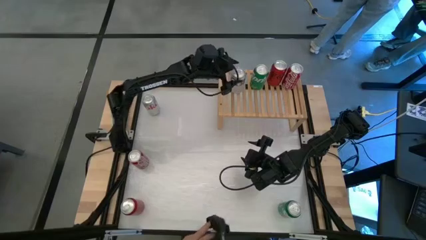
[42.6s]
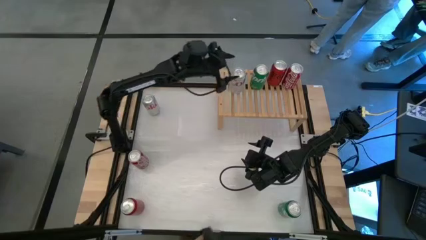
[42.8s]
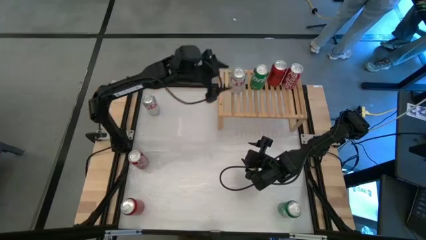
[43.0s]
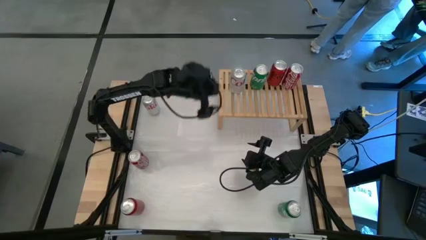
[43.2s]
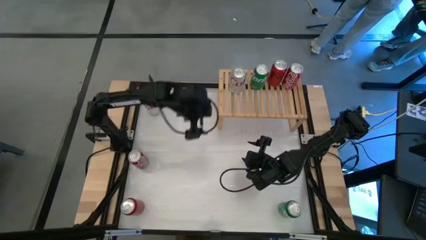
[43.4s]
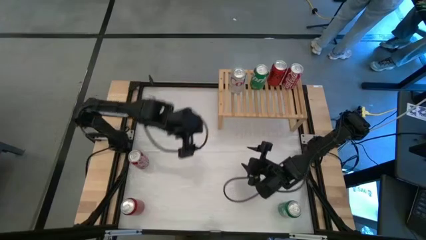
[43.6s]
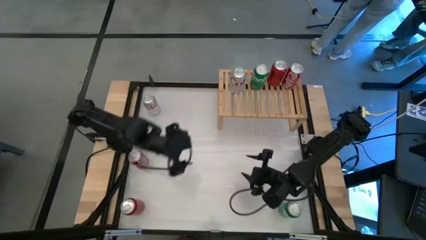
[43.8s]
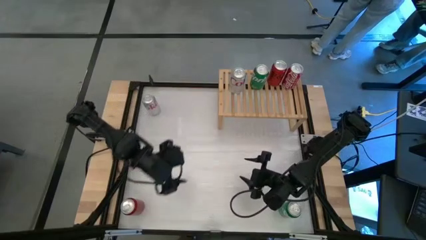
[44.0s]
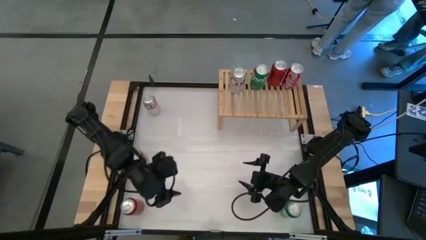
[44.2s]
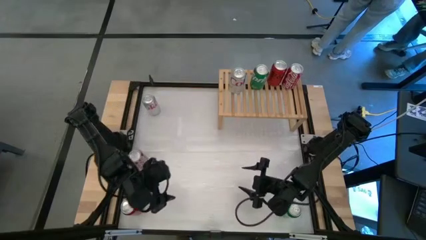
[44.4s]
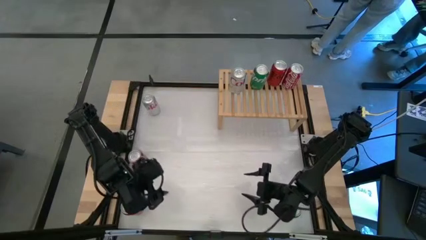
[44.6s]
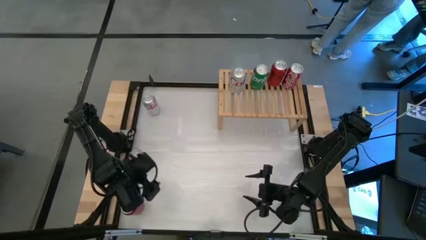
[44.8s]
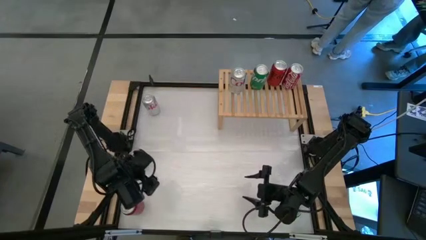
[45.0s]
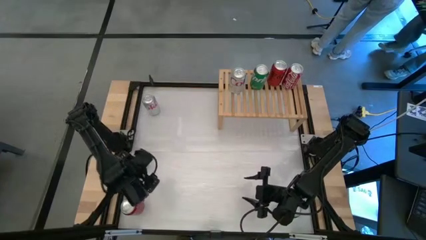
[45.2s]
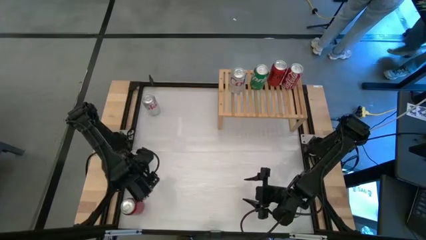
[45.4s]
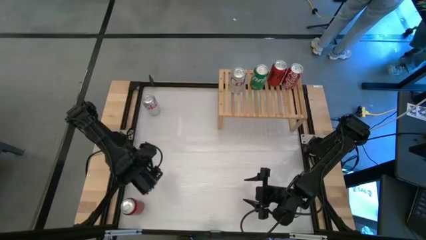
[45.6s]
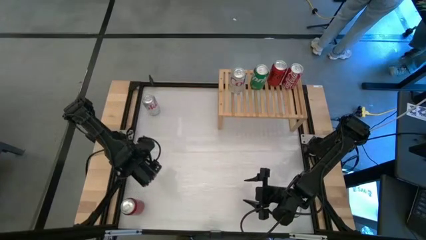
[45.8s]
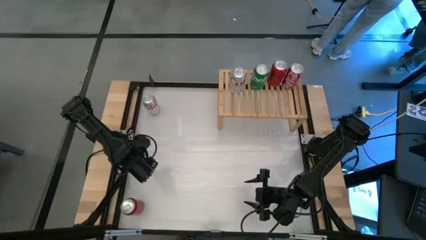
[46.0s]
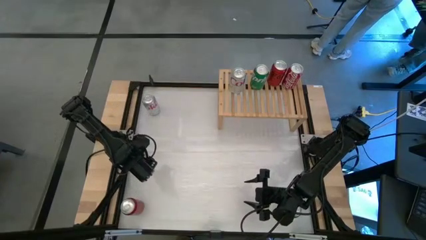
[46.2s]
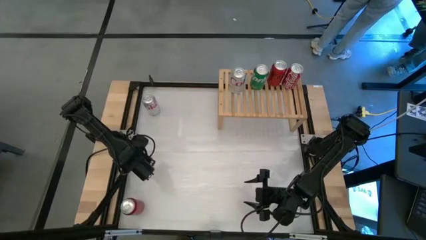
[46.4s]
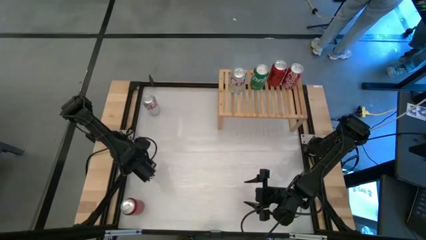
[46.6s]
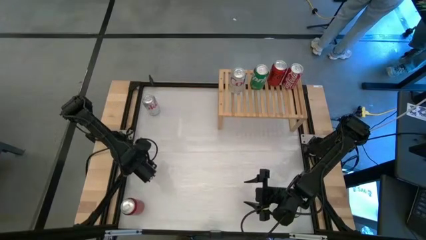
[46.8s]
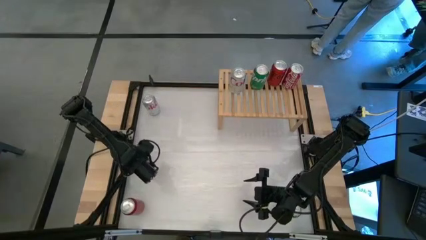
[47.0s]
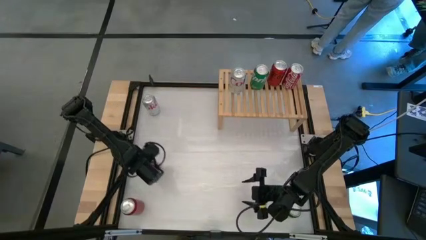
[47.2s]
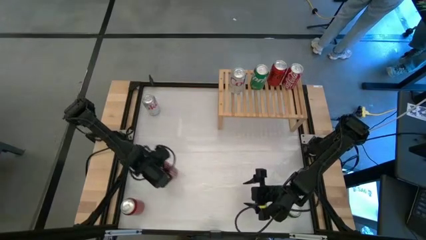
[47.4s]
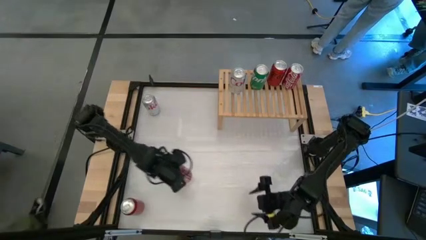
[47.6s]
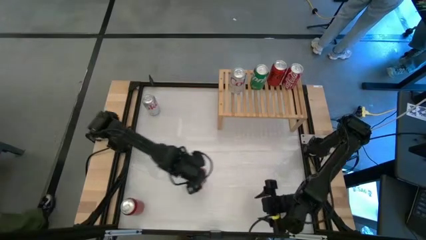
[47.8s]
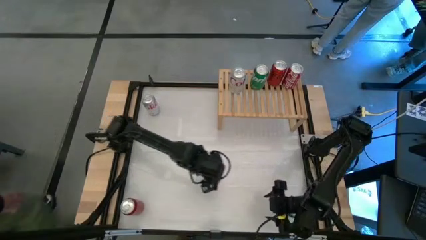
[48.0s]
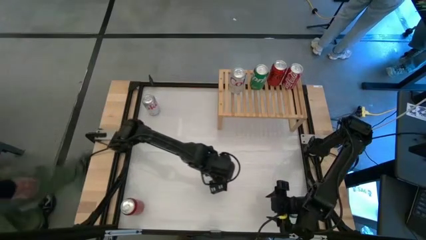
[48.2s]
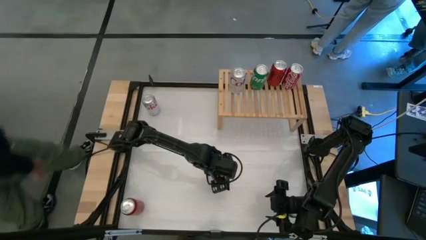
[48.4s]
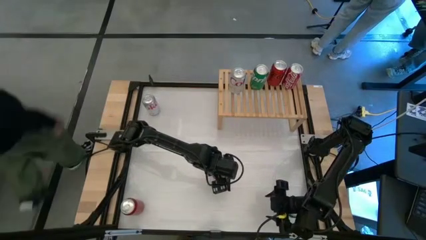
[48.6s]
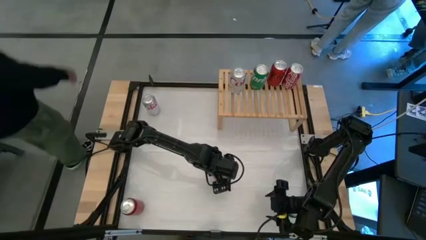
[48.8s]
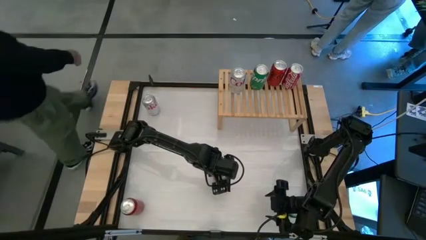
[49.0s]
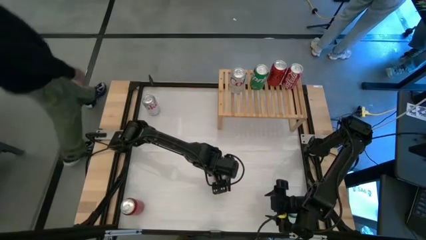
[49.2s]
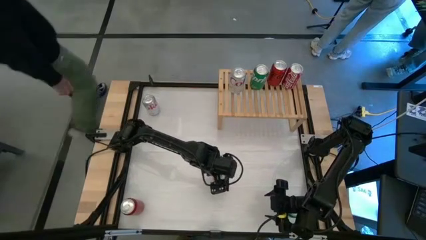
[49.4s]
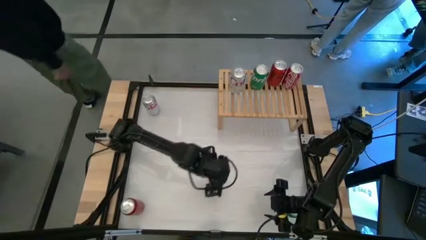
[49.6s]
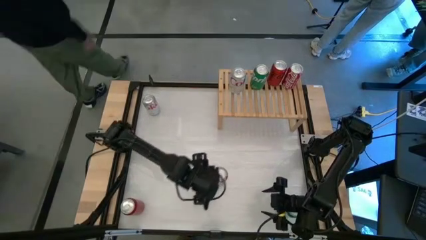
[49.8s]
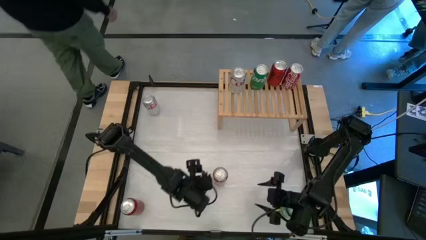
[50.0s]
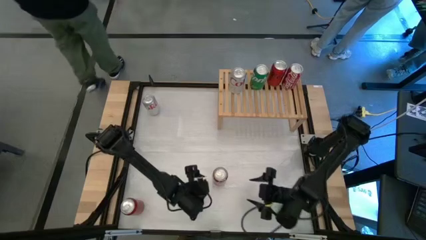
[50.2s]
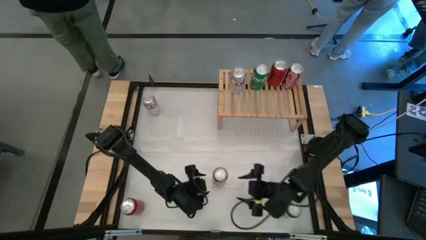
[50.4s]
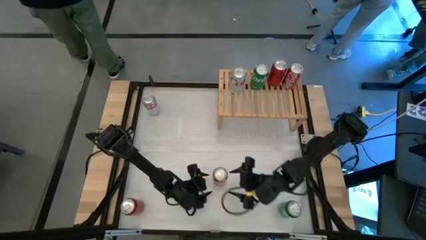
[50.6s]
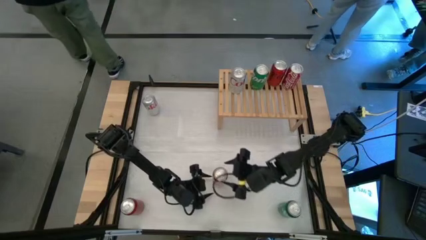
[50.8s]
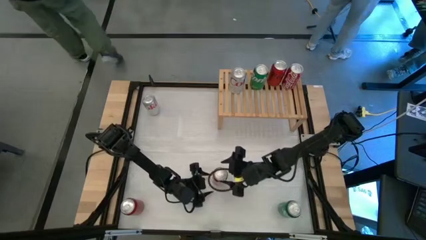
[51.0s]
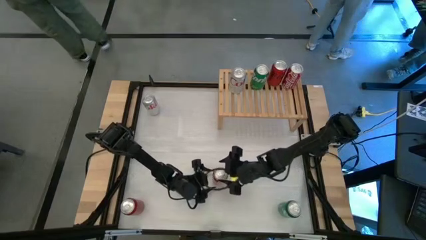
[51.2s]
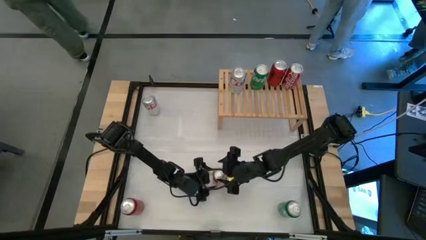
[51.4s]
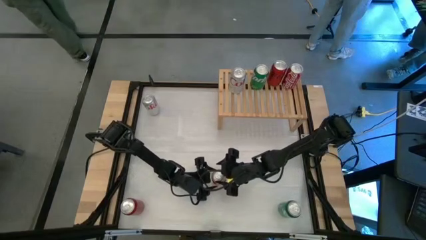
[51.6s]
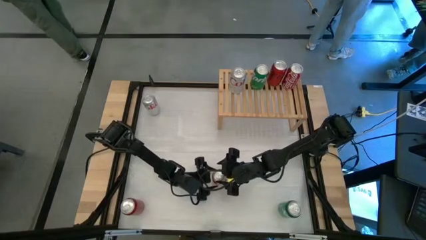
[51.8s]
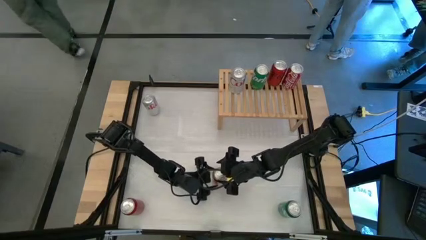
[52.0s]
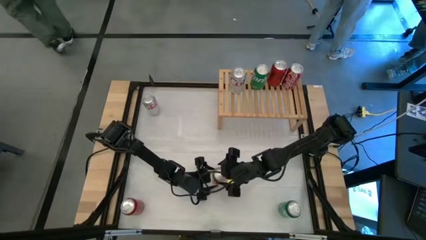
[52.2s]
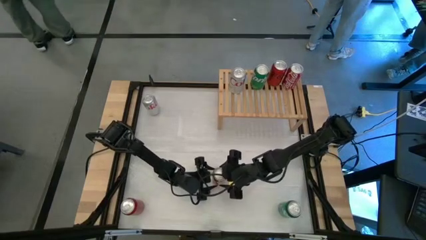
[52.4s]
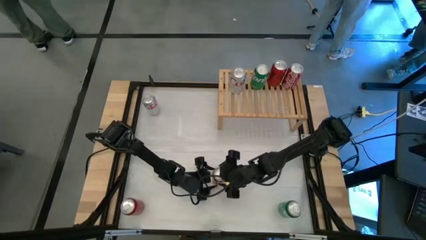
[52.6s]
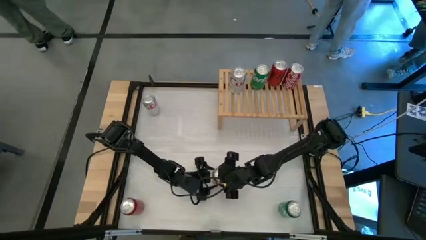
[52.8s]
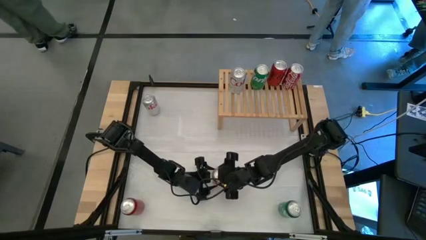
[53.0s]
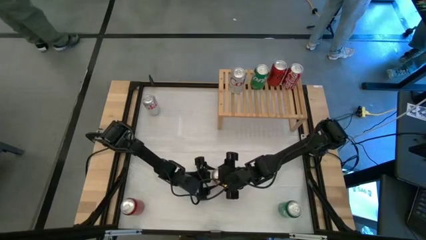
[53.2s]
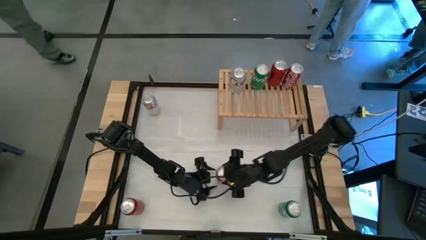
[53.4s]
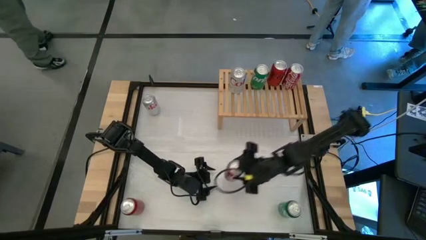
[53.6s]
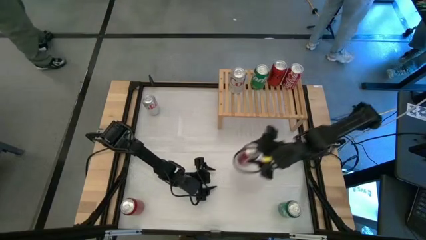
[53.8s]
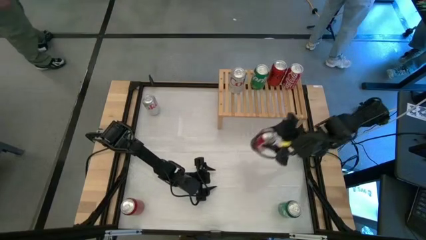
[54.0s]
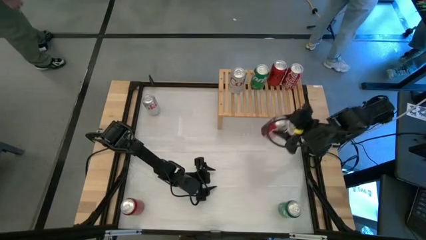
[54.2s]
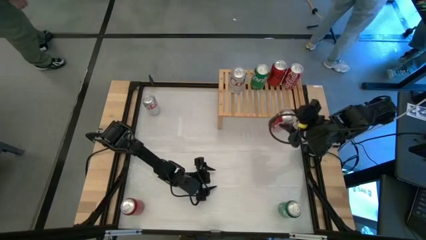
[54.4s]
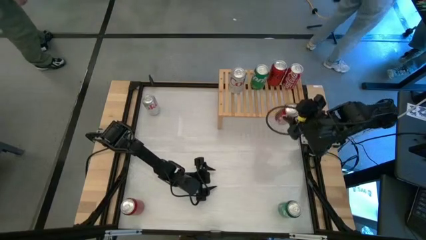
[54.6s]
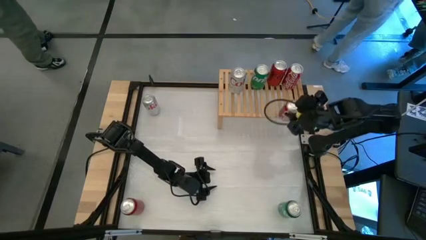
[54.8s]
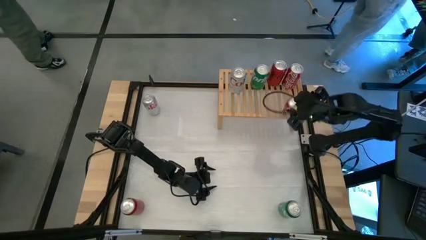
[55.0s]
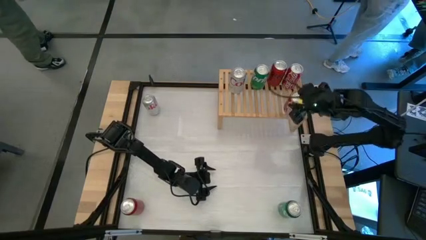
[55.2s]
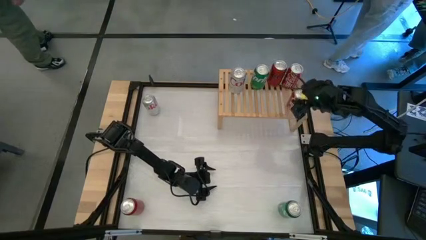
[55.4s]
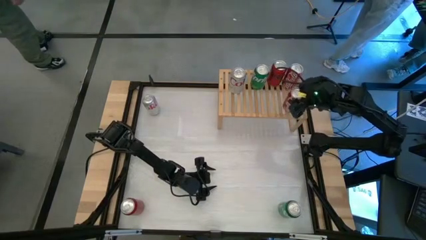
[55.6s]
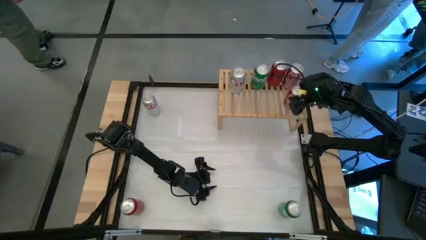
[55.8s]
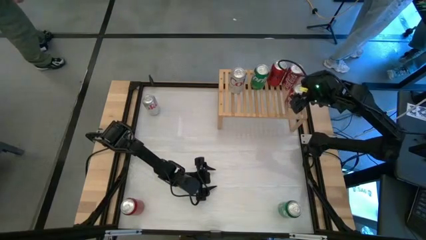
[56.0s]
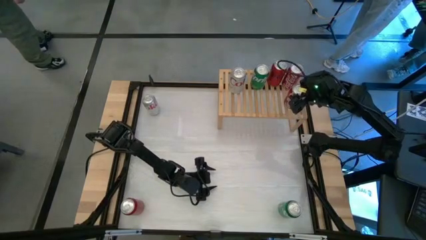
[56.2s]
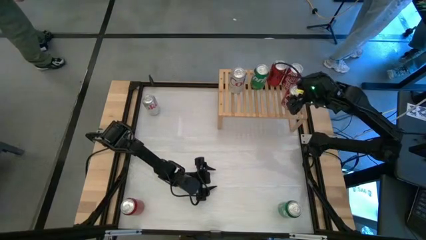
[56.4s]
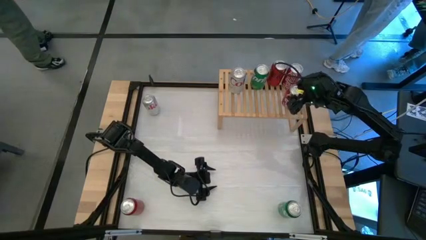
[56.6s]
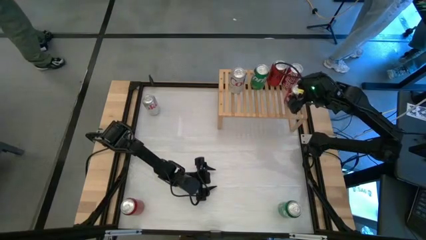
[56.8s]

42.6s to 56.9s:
Task: Place canned beverage on shelf
Put the red white soda can on the shelf aligned with the other red white soda can

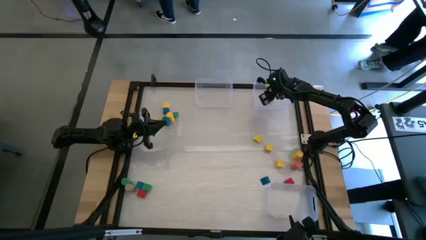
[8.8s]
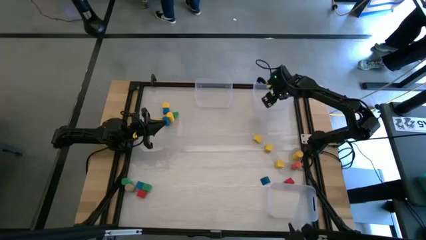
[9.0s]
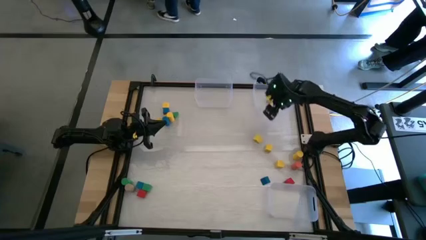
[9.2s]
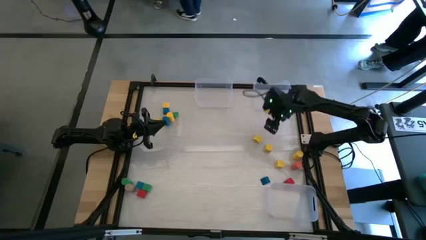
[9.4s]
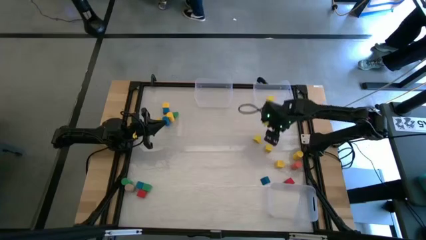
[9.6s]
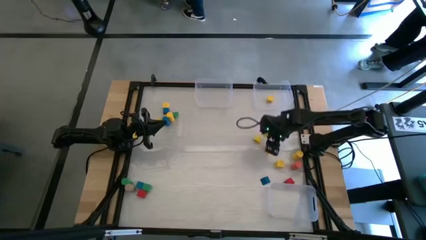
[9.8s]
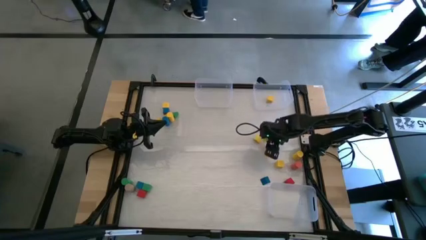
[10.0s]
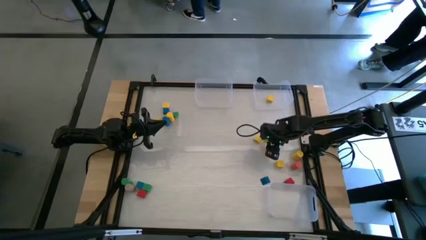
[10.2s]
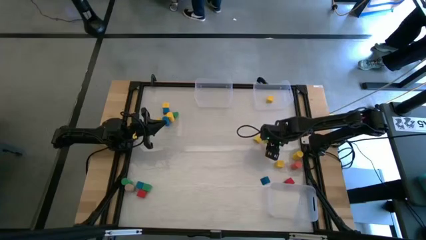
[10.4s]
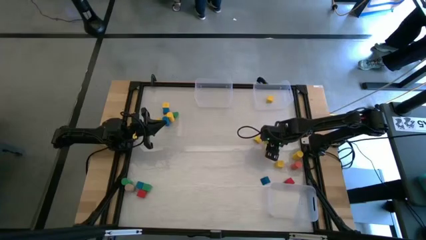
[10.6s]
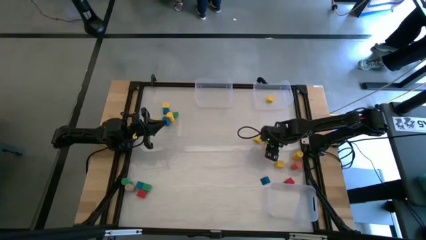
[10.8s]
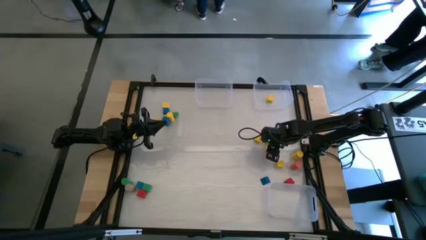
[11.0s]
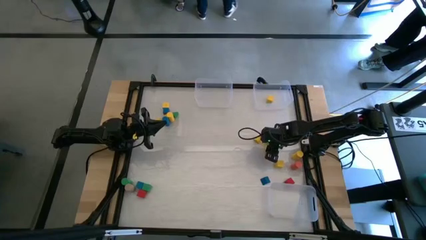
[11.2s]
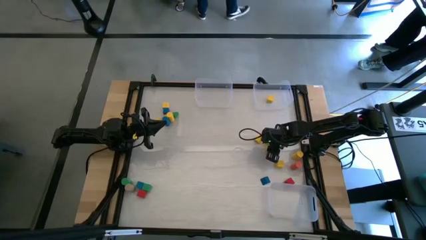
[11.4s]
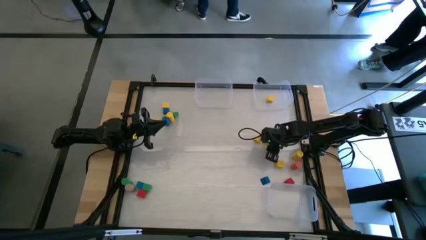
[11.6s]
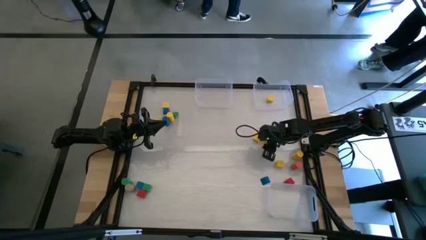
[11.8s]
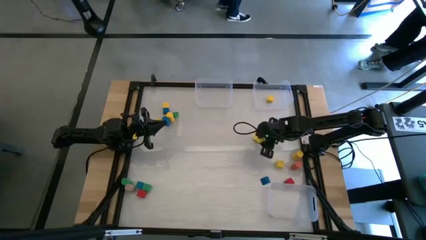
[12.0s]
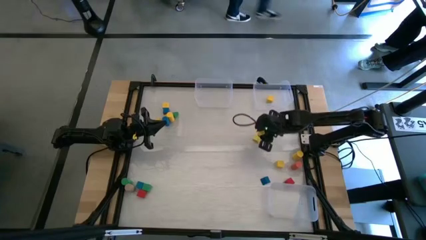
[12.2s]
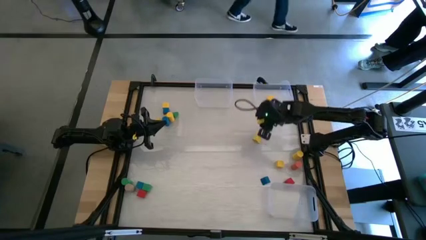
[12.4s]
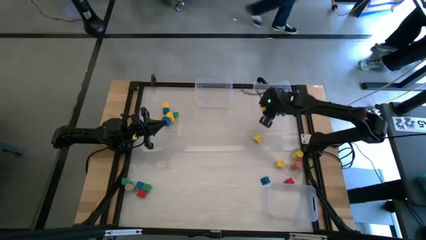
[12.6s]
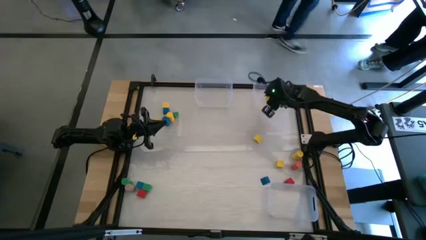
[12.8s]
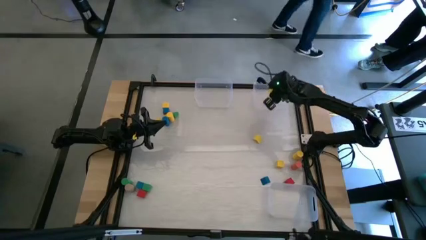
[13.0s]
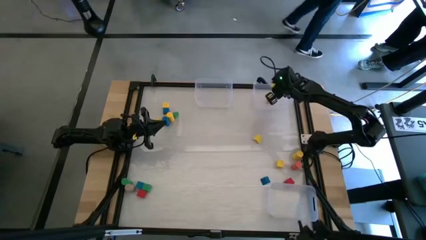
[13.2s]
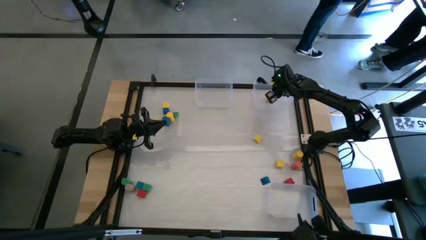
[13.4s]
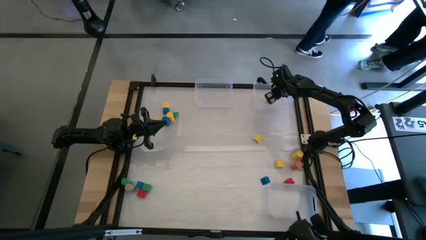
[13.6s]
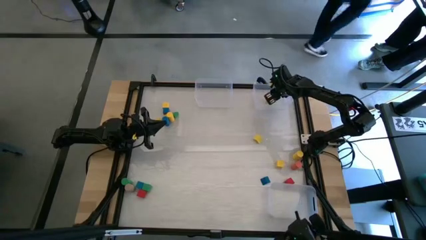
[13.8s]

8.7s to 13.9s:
Task: Sort blocks by size
Put the yellow square block into the top right transparent bin
